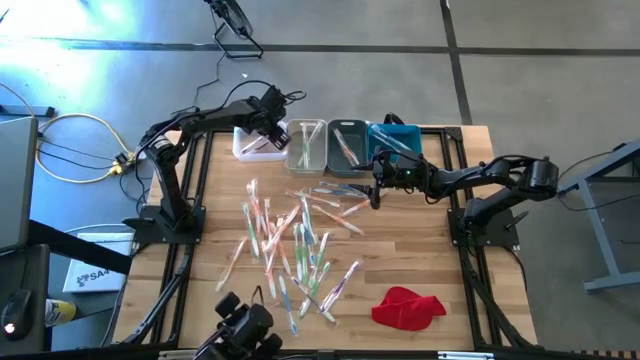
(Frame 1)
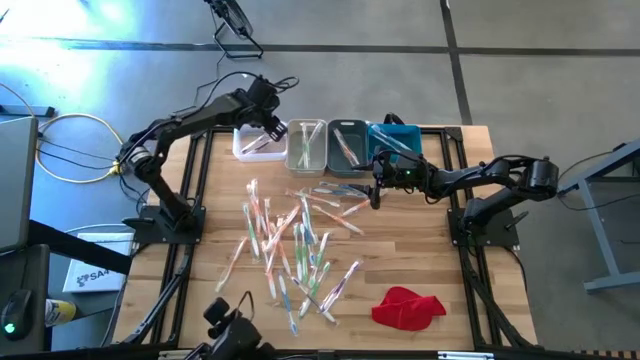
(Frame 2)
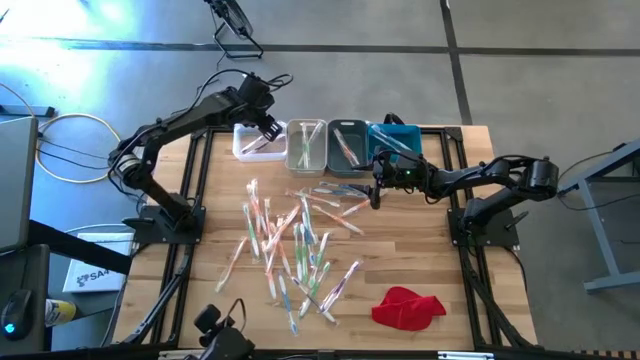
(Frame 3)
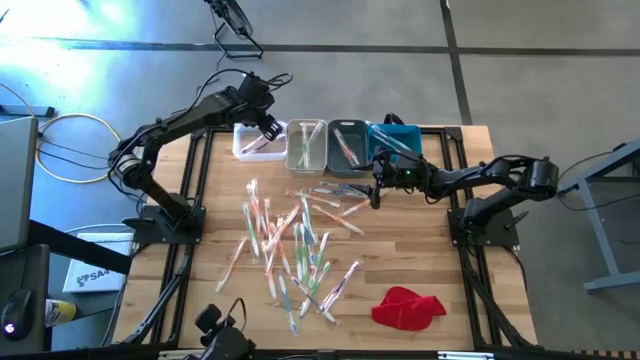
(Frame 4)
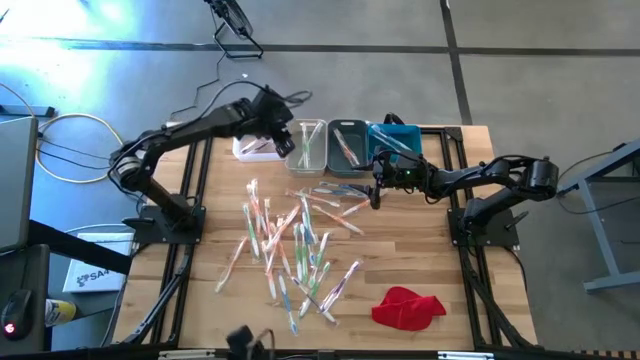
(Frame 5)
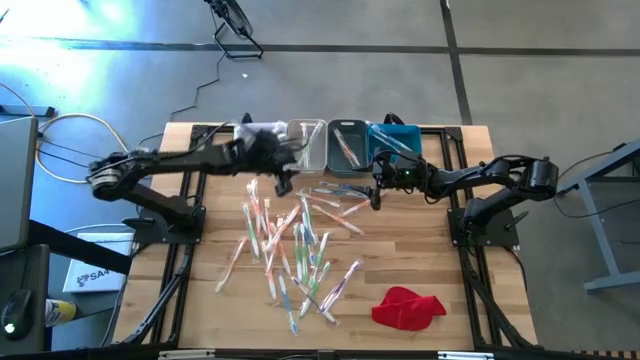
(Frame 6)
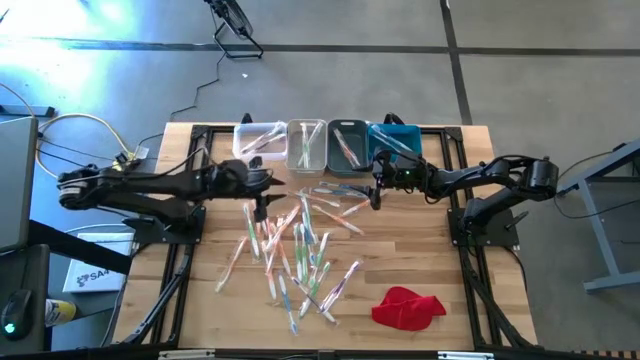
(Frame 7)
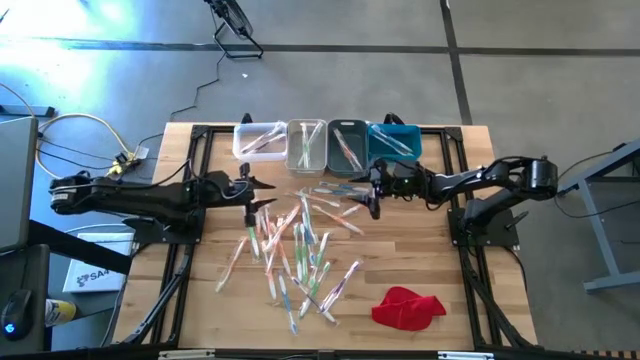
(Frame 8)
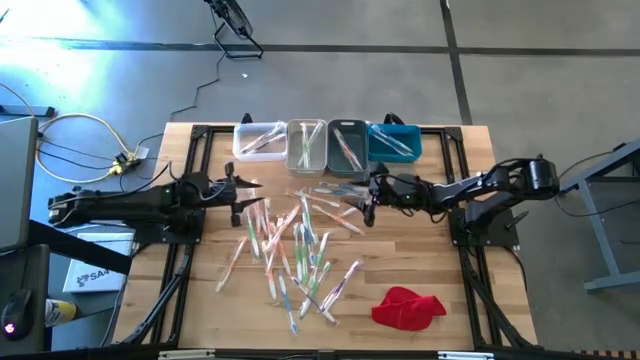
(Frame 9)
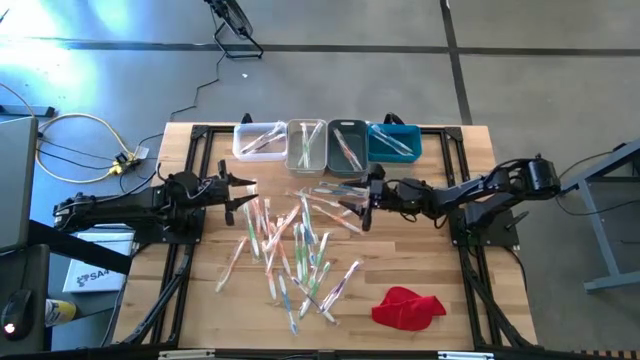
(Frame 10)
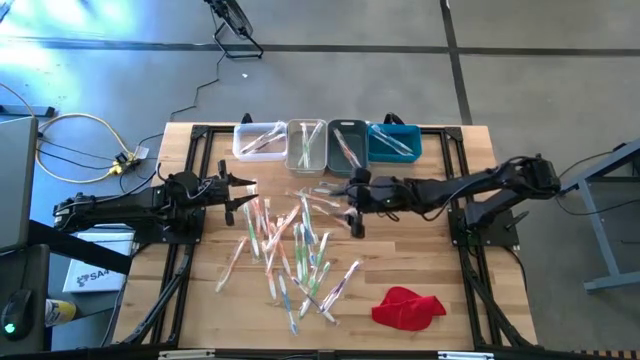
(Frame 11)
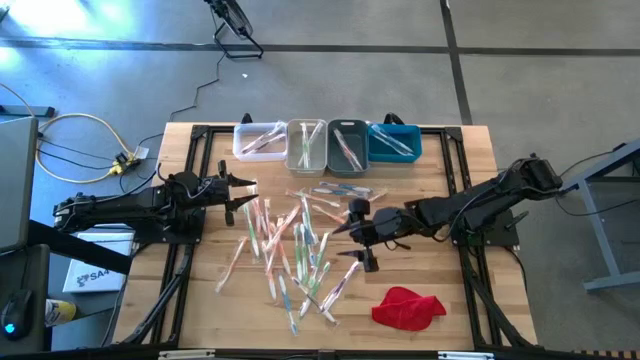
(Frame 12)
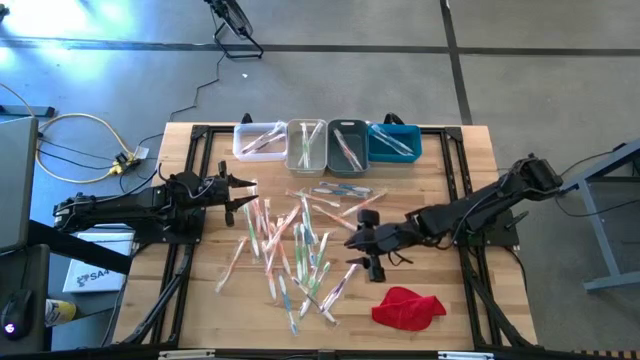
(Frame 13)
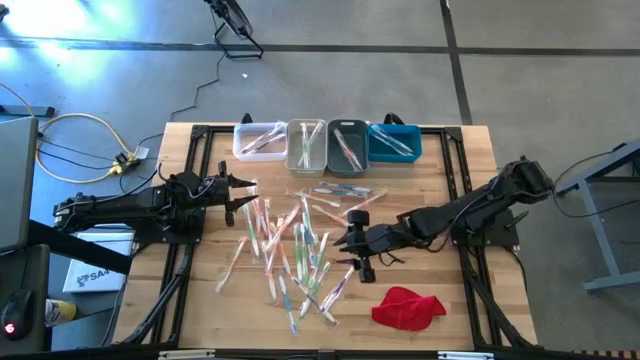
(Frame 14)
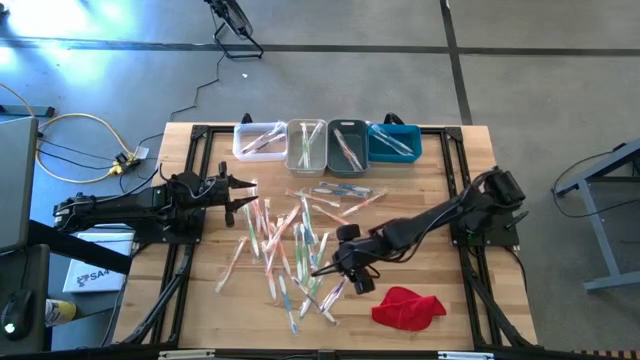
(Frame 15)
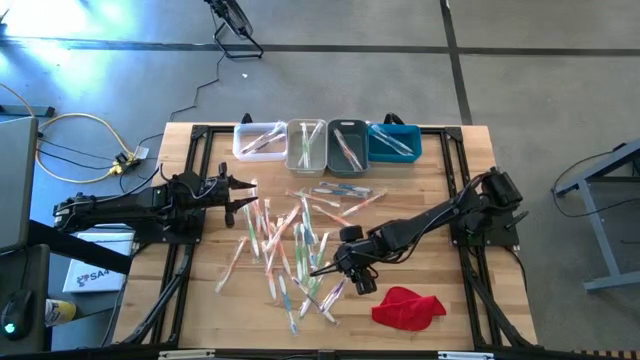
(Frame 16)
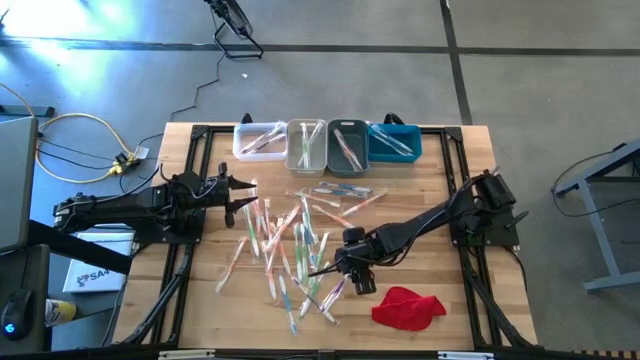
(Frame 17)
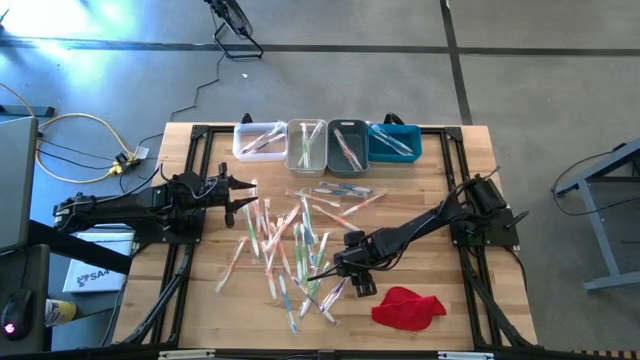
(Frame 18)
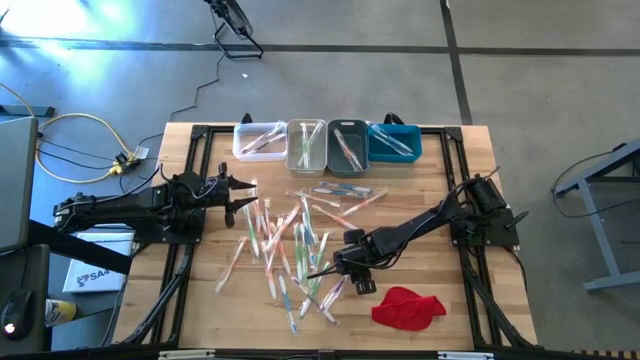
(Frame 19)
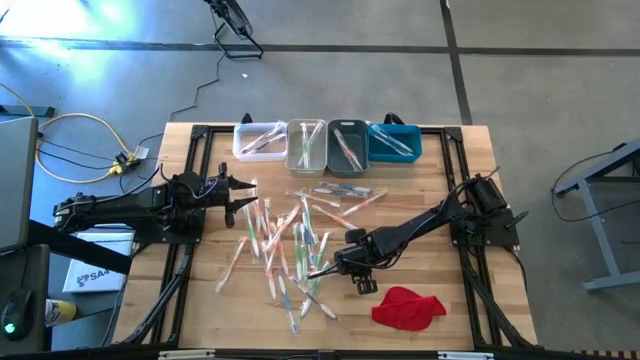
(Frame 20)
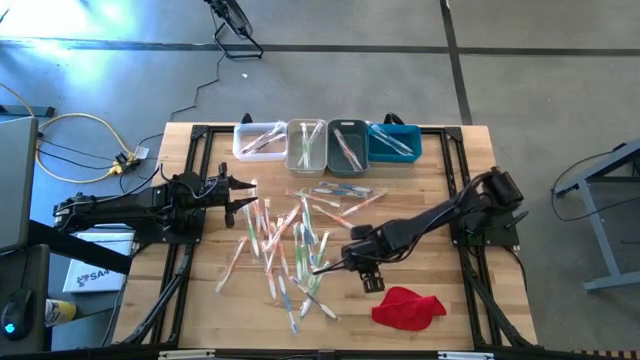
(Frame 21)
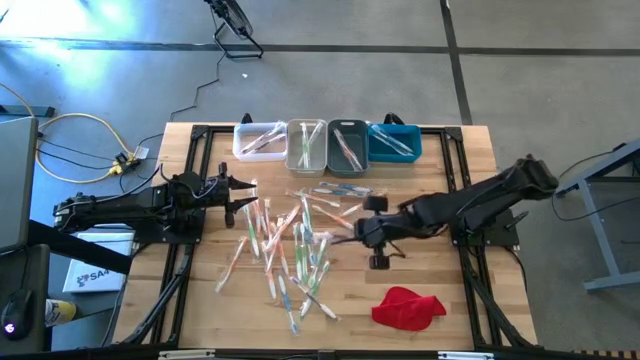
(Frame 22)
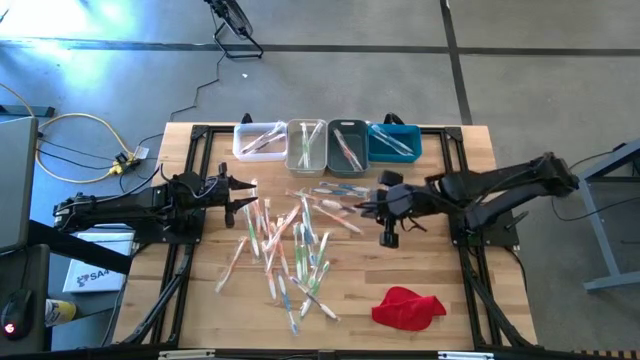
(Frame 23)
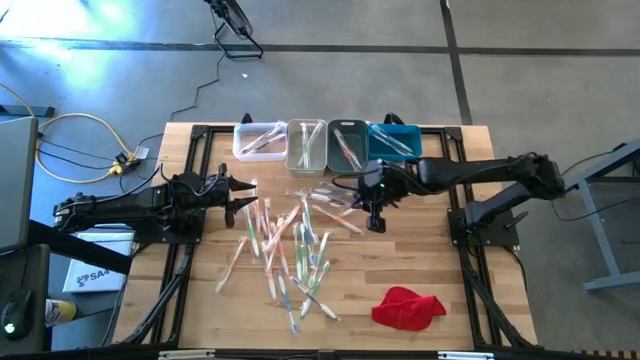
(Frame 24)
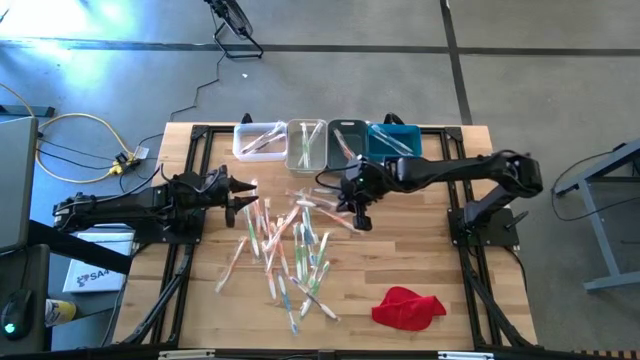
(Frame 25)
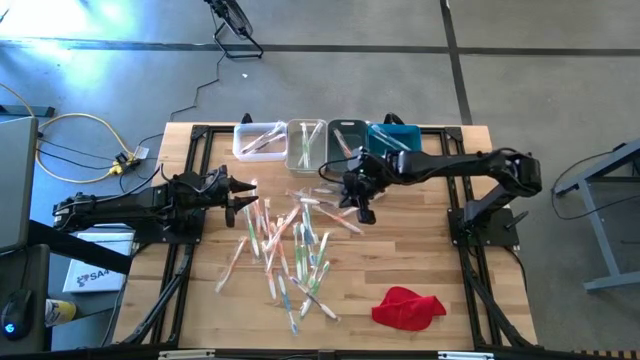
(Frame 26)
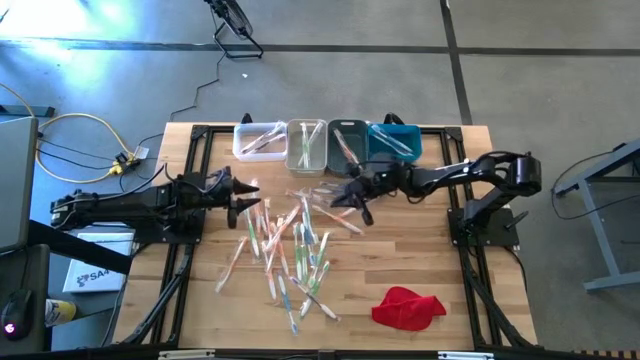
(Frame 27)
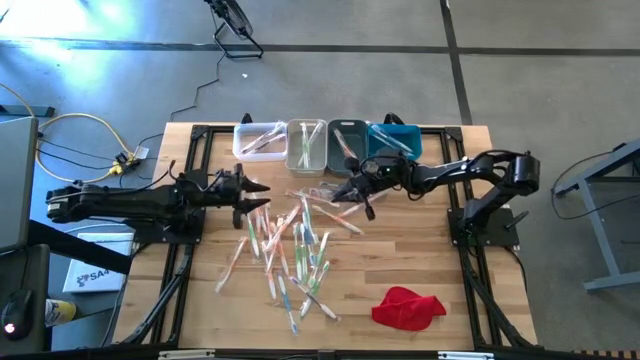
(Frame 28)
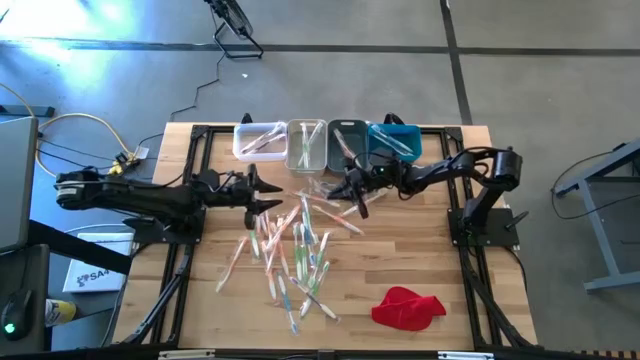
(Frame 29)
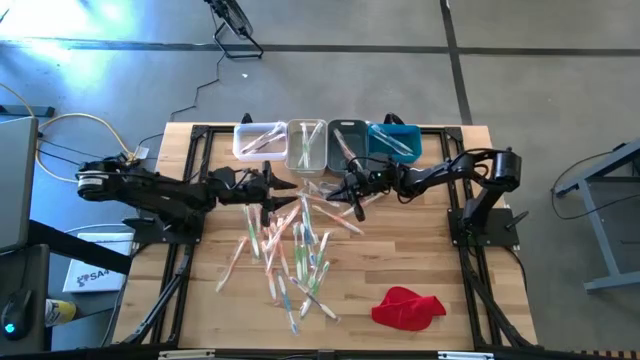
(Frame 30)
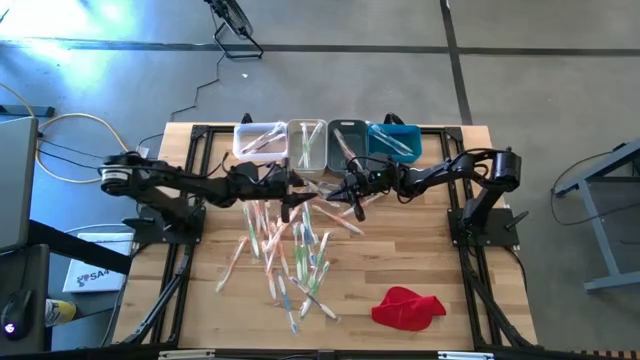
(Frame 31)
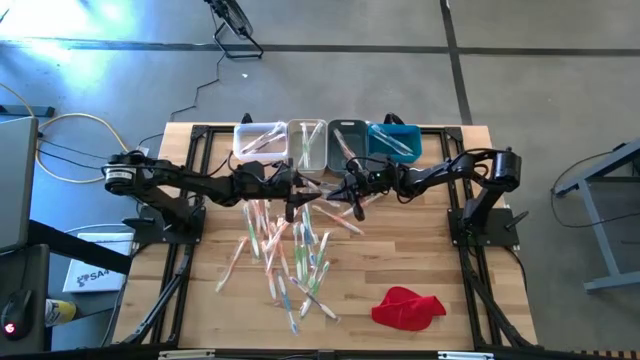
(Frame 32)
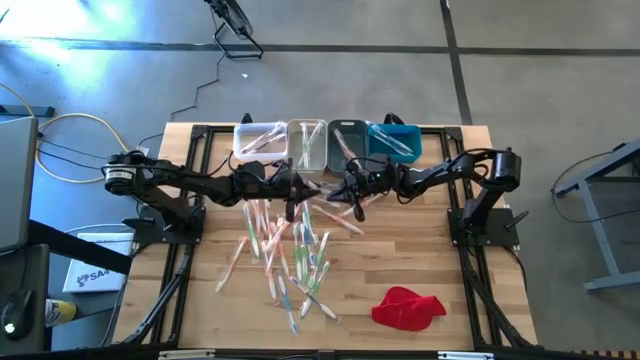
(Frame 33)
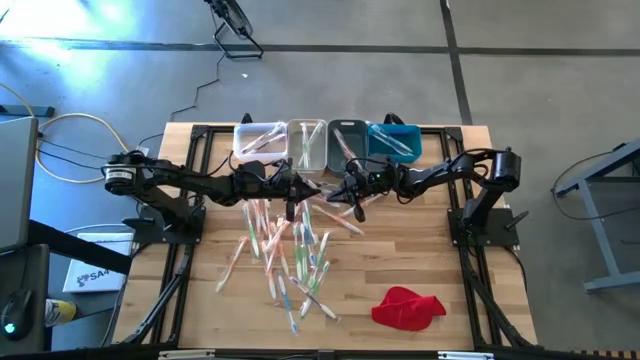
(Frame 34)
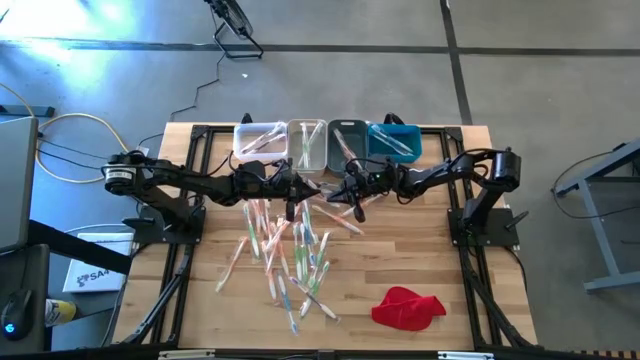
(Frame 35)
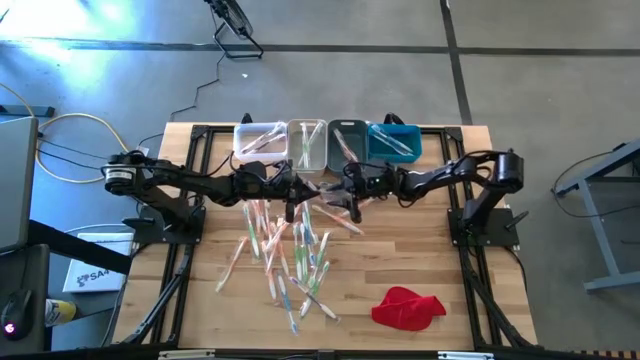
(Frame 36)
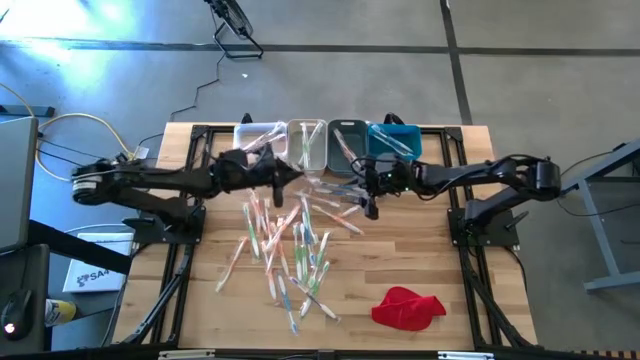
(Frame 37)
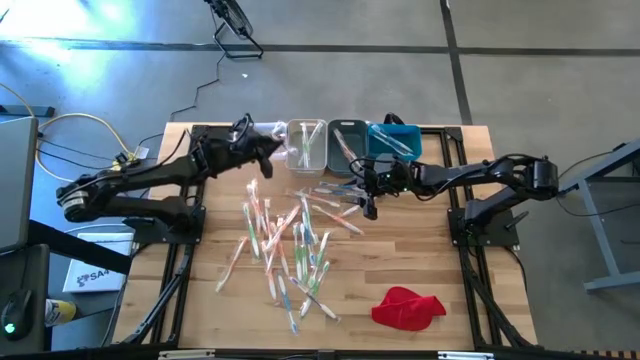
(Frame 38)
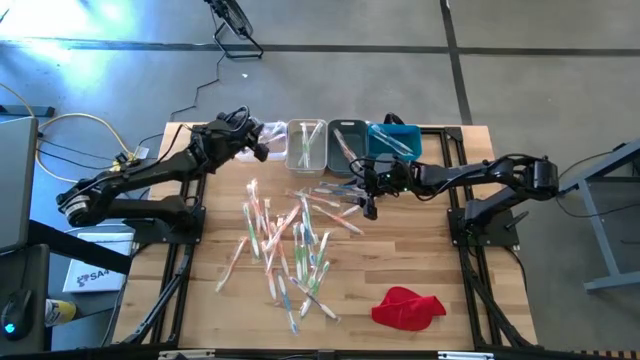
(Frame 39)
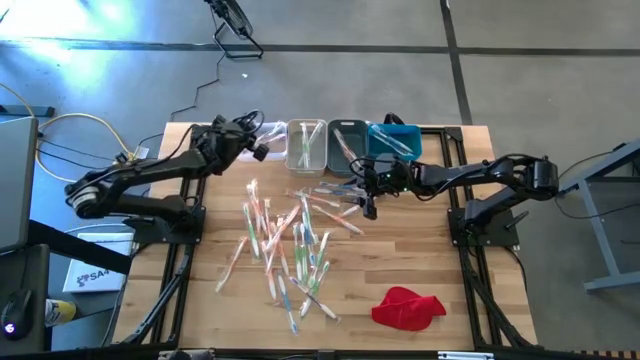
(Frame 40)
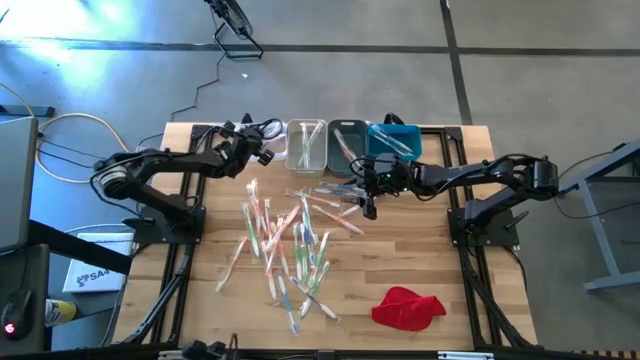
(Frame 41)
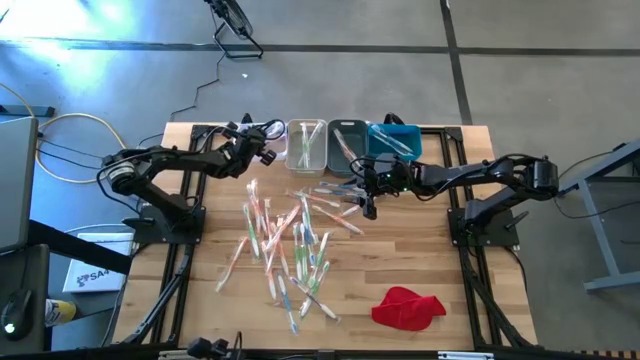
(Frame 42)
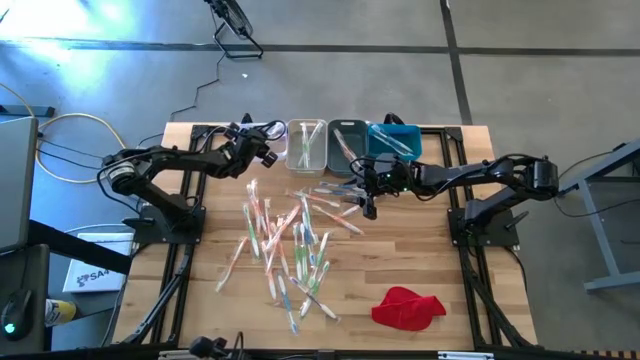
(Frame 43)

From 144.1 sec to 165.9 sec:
Task: Pick & Place Toothbrushes
Put the purple toothbrush into the transparent bin
